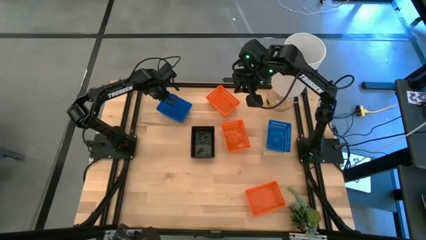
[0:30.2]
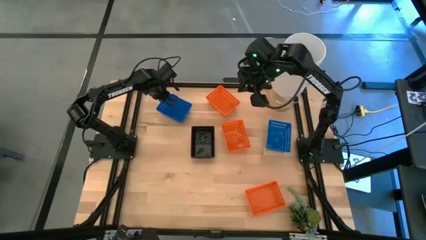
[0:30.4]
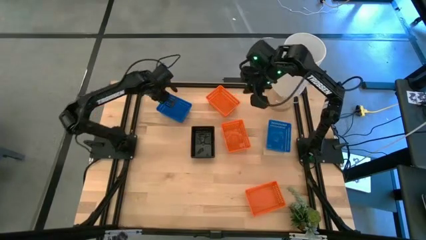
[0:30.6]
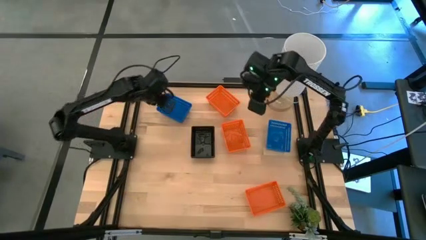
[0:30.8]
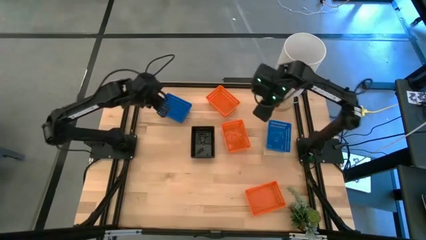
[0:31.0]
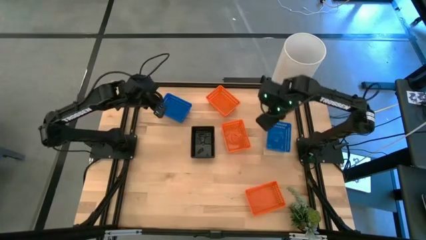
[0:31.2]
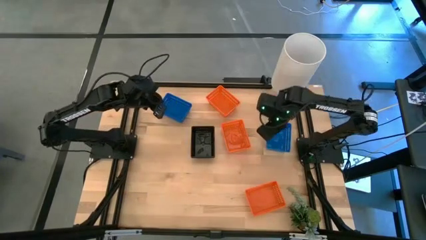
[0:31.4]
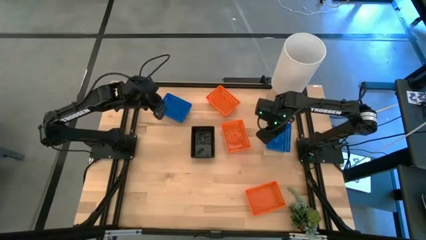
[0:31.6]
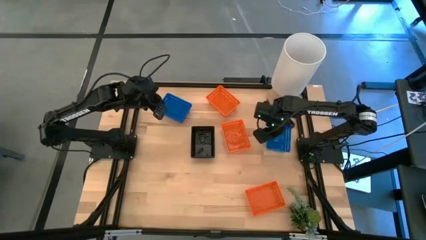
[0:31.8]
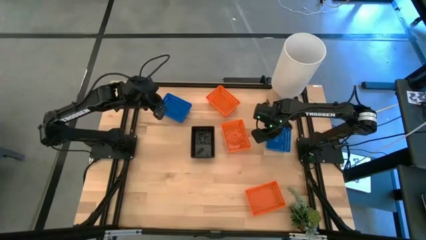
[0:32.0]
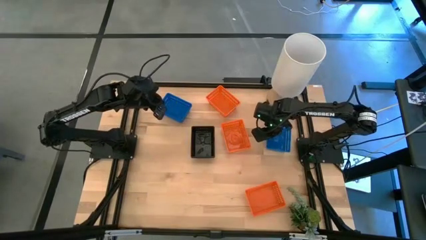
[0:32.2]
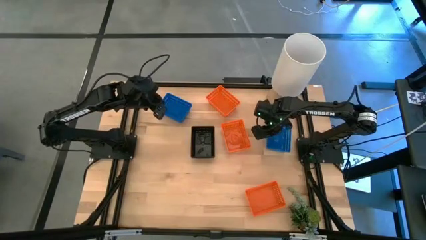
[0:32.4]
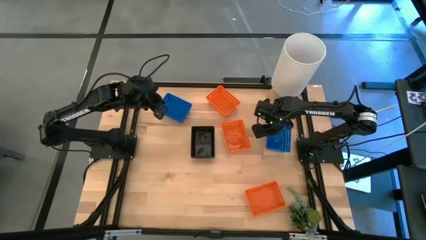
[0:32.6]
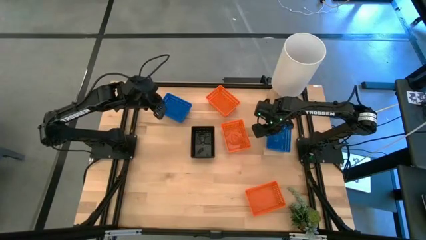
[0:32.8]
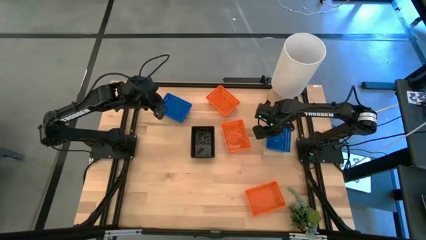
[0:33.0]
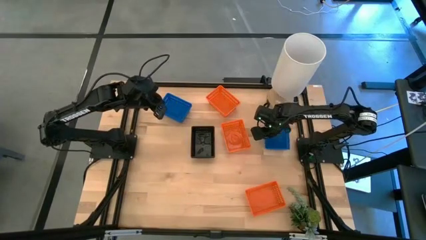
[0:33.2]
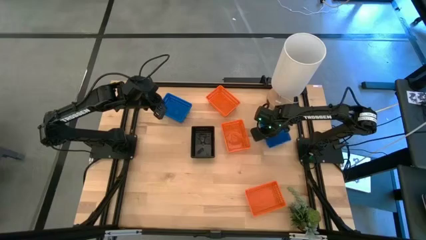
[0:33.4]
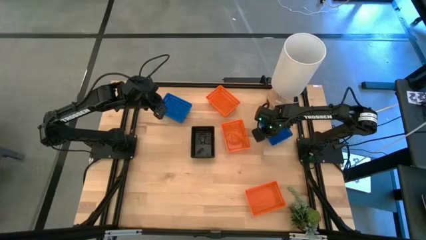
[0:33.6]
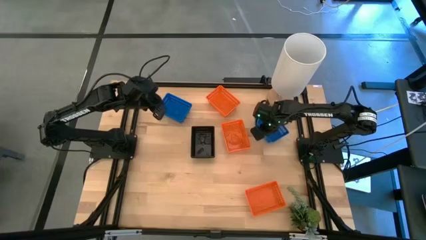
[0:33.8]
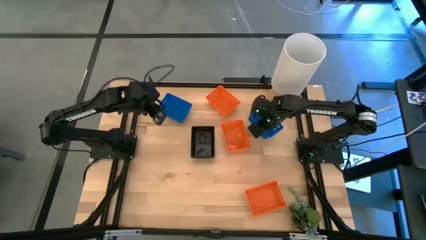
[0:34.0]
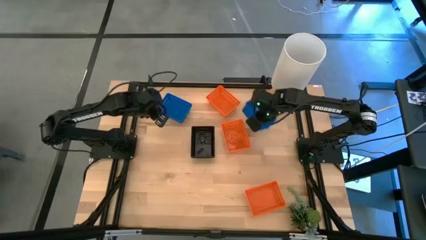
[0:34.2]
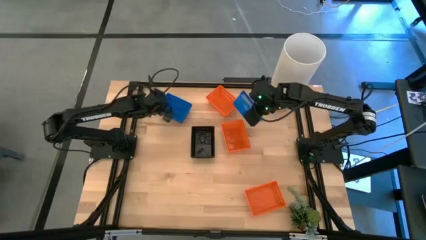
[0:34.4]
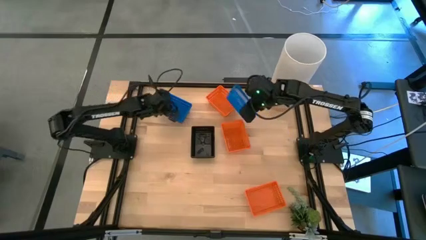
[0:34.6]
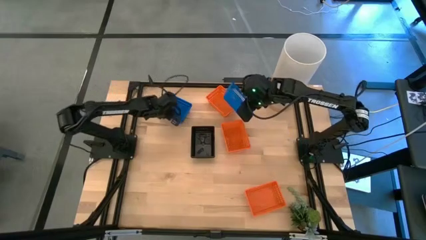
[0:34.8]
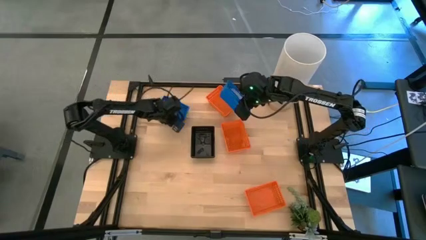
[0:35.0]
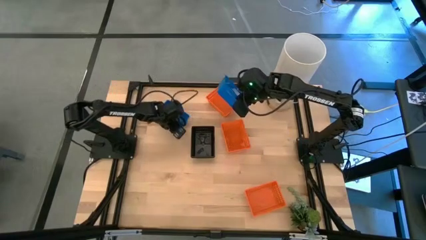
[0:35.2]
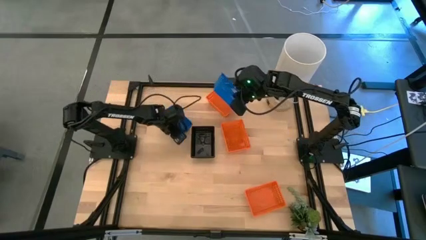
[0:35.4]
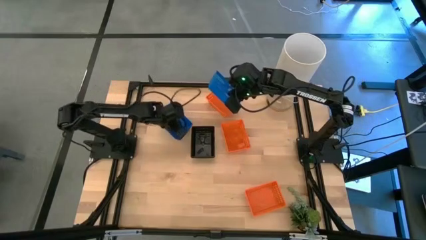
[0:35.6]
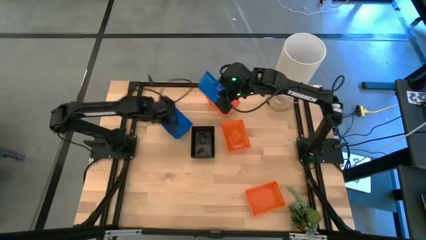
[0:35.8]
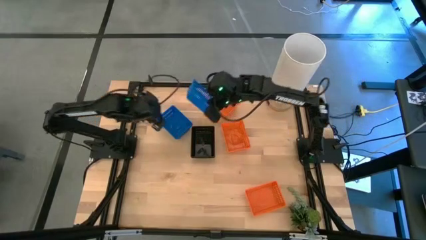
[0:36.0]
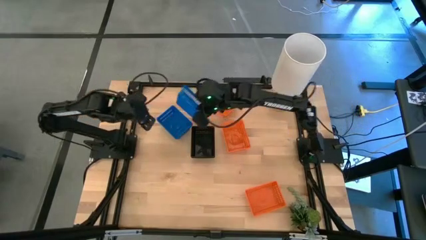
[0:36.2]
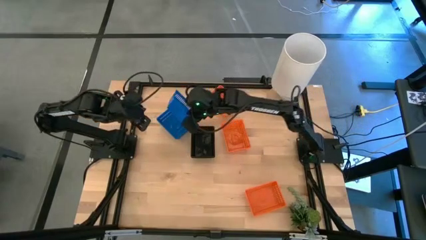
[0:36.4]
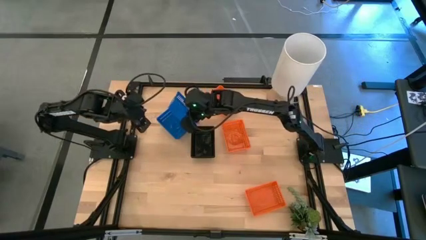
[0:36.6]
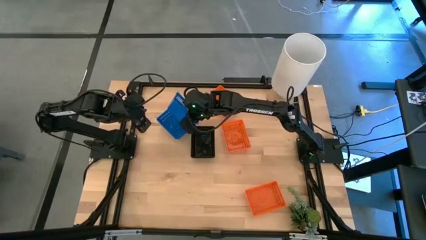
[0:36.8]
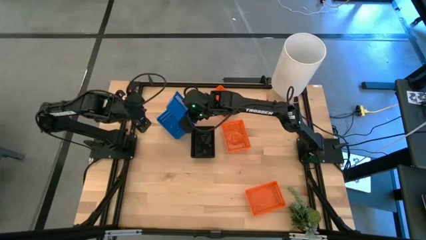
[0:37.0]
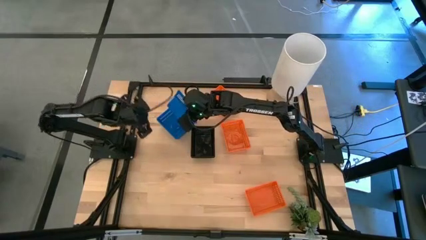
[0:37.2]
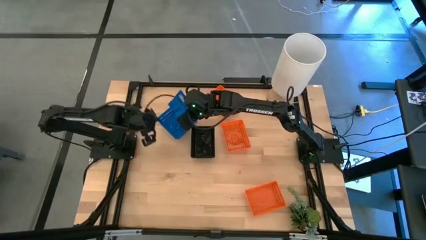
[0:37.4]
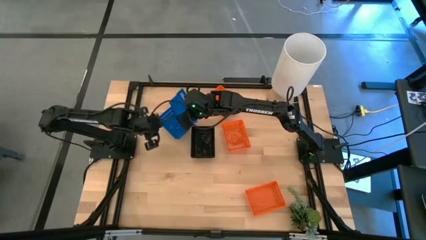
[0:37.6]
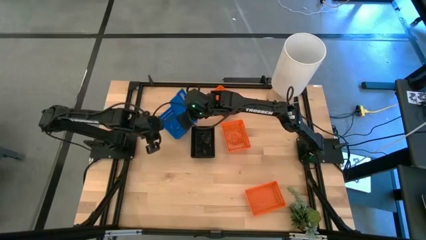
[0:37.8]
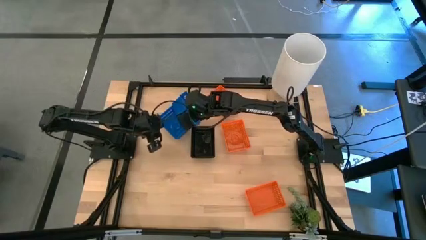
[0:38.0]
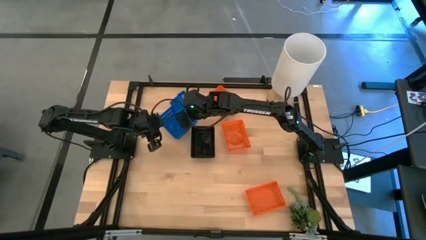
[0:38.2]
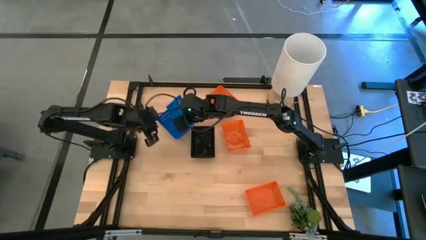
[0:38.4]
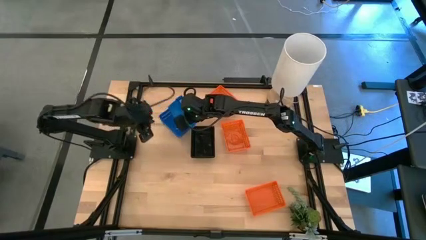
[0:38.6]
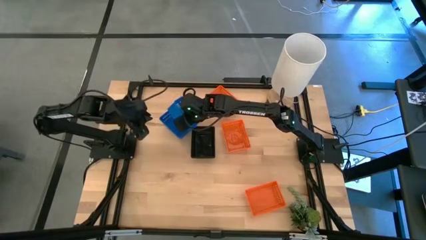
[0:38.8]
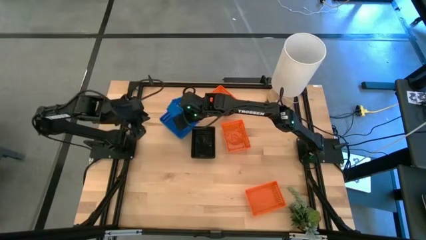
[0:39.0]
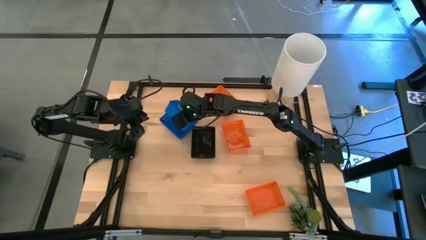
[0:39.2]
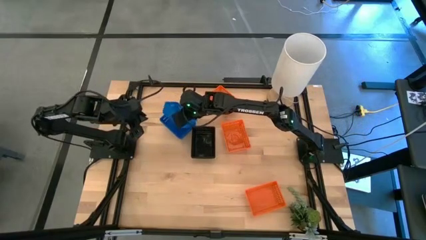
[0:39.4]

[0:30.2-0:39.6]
Stack the right blue bin on top of the left blue bin

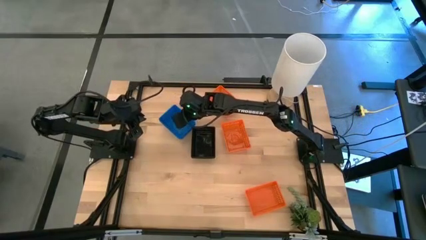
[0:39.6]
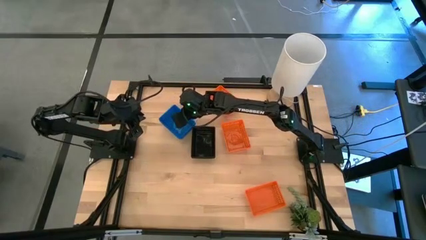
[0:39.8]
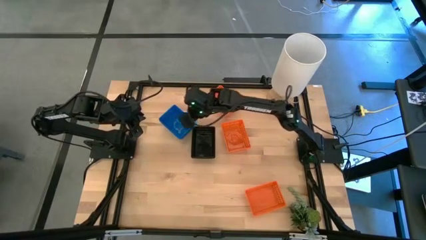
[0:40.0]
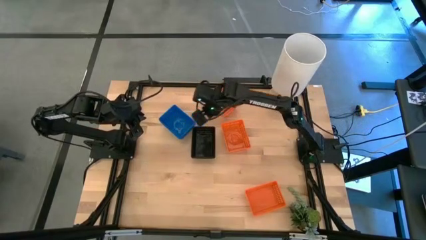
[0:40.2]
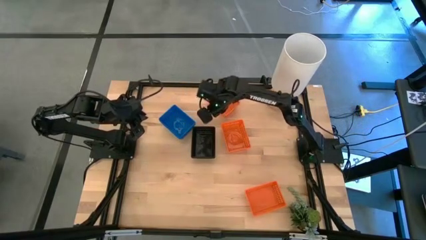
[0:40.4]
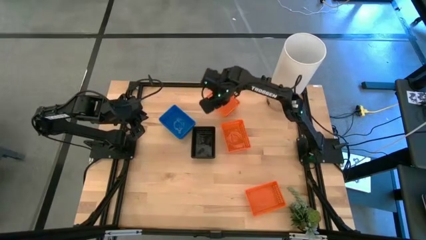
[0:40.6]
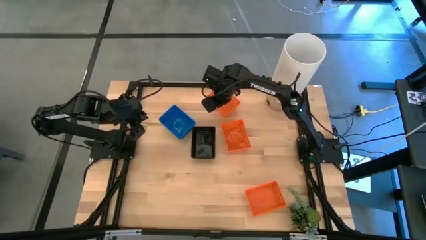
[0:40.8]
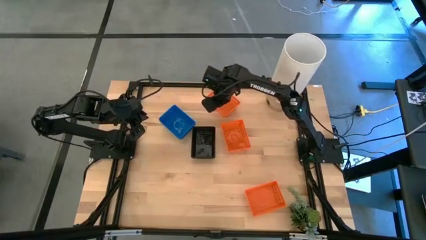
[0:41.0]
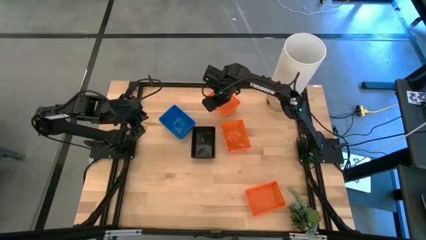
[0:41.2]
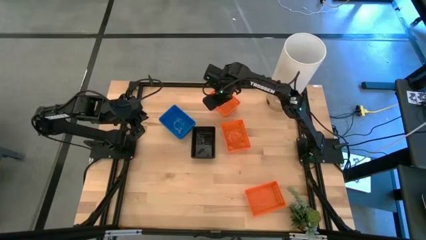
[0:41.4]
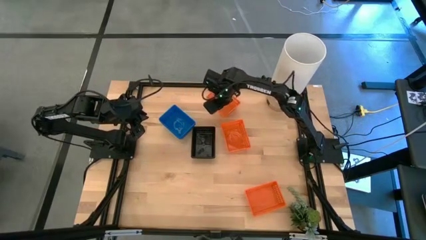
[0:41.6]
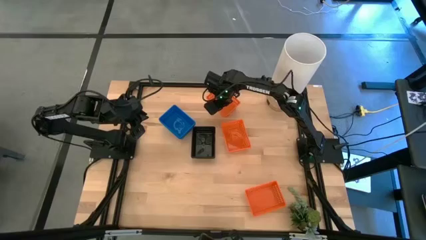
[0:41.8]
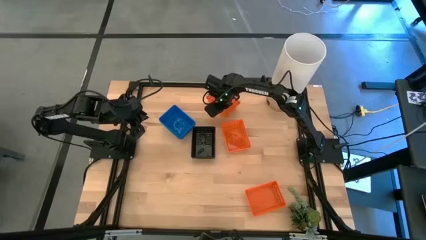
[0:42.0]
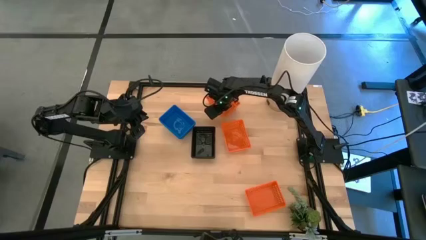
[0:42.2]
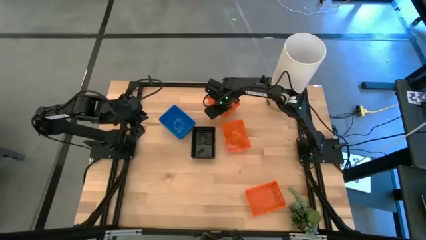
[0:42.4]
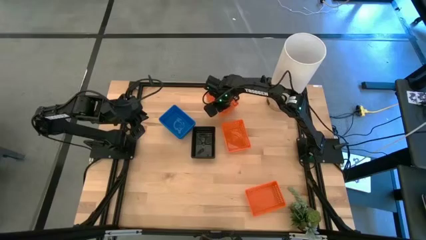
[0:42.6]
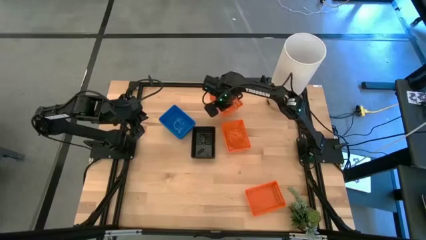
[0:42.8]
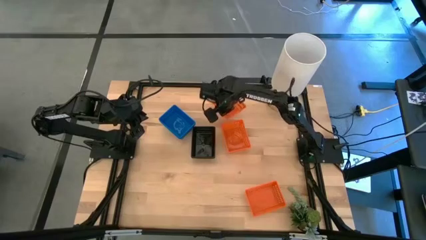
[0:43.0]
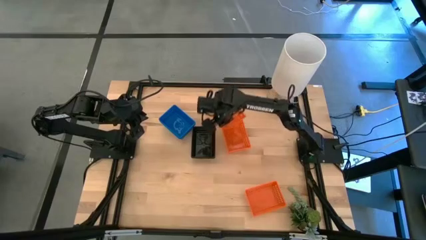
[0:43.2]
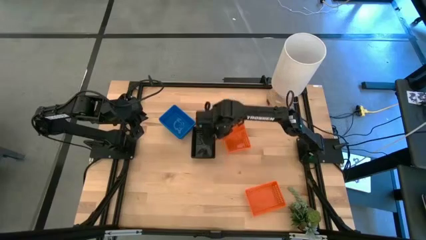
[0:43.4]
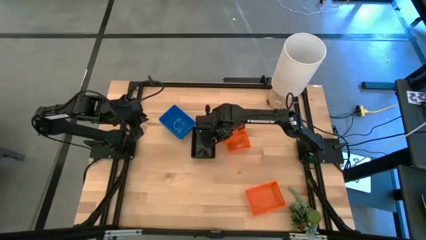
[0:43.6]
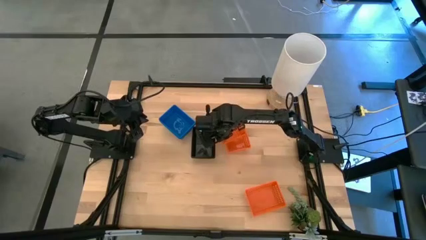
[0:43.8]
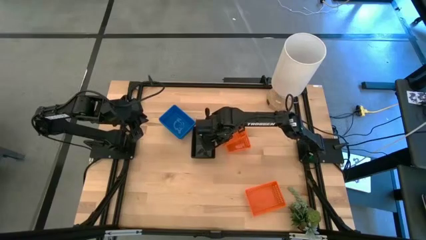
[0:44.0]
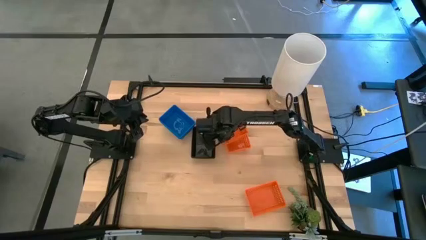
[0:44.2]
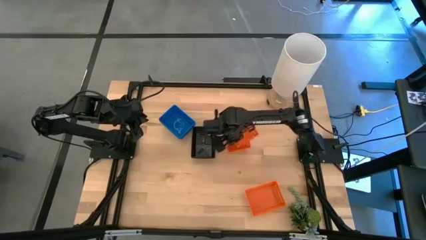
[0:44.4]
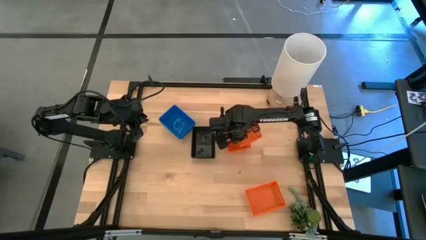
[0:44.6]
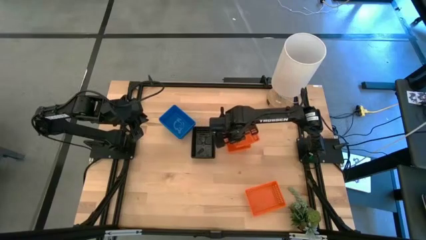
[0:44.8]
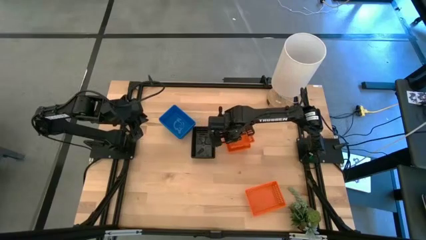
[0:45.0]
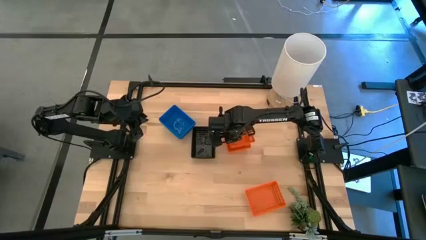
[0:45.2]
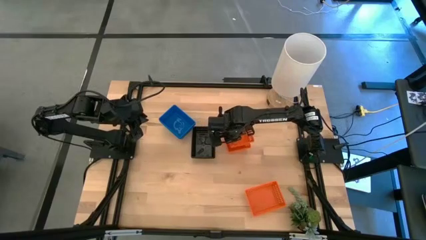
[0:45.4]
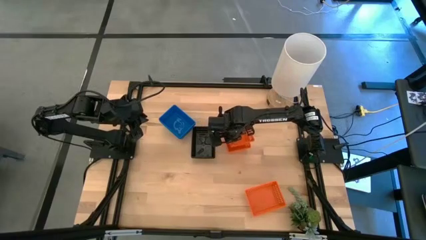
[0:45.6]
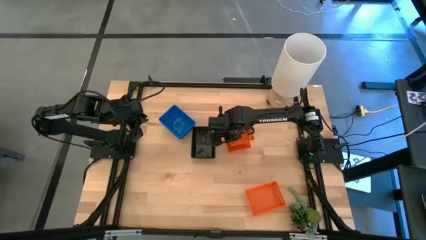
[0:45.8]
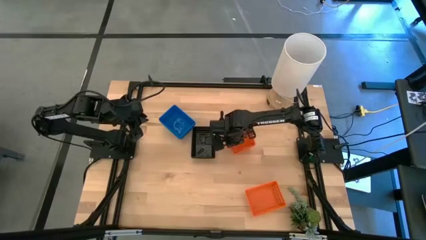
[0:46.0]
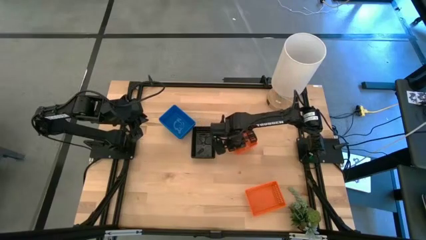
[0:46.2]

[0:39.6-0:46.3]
Stack the top orange bin on the middle orange bin
